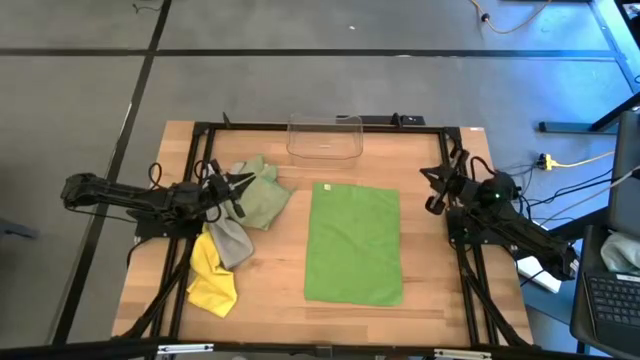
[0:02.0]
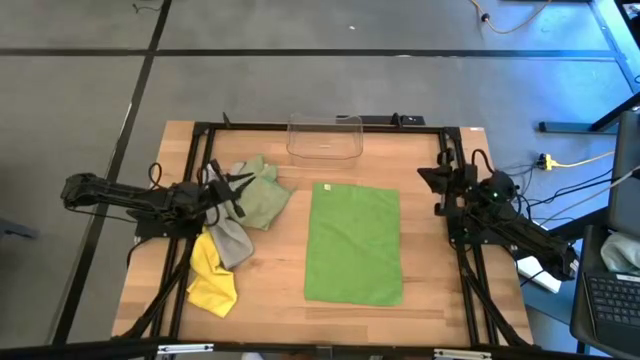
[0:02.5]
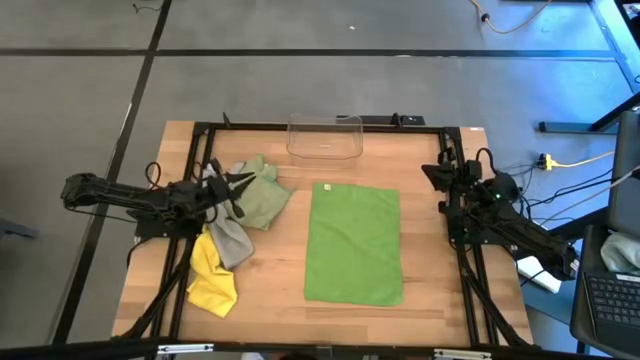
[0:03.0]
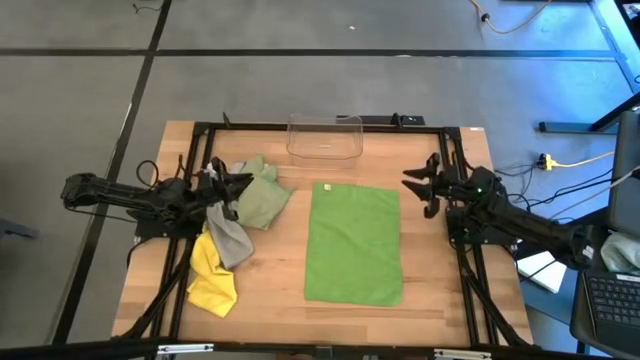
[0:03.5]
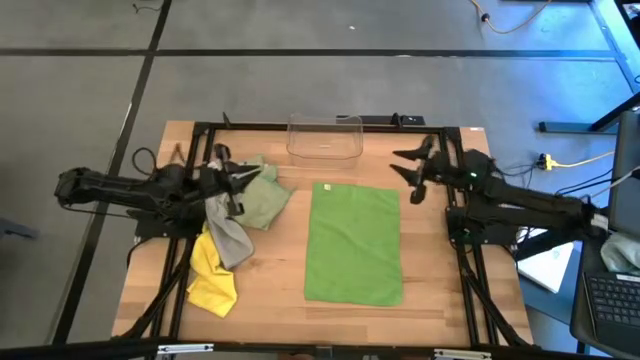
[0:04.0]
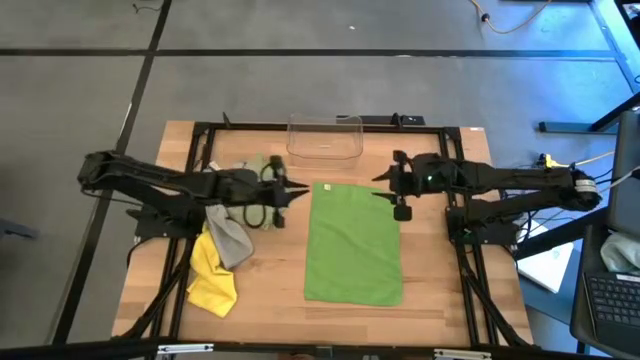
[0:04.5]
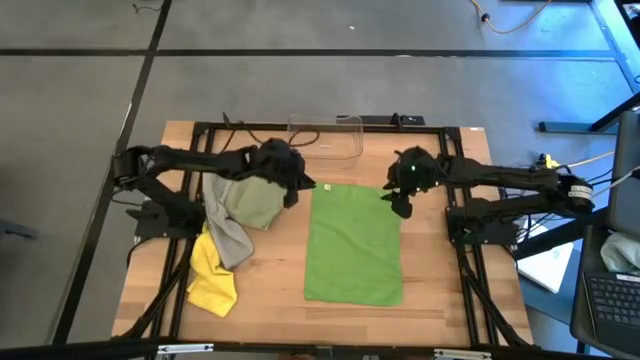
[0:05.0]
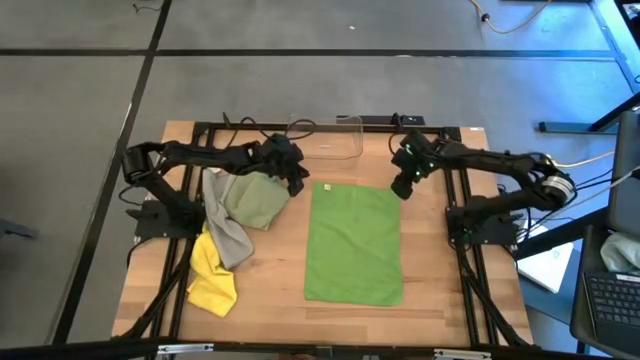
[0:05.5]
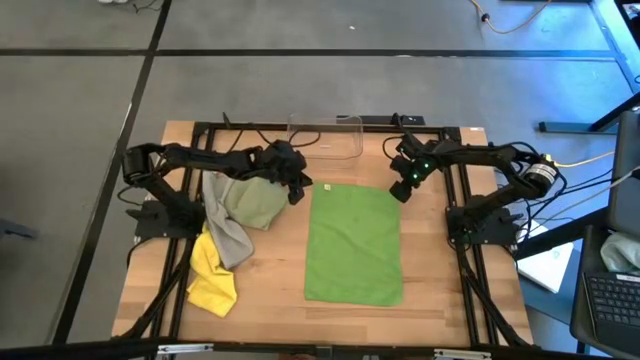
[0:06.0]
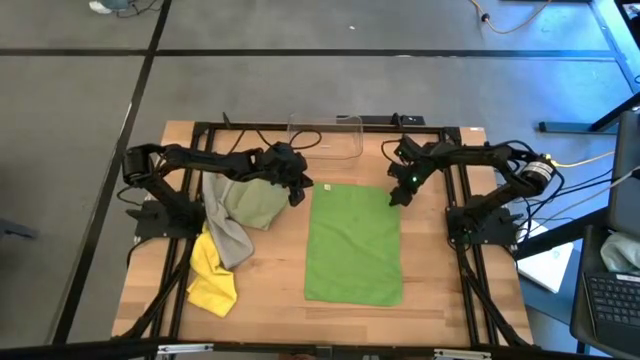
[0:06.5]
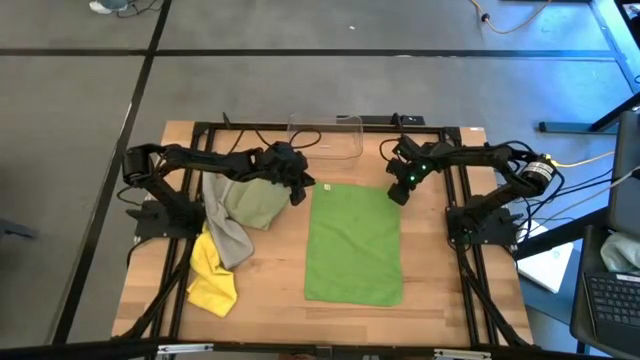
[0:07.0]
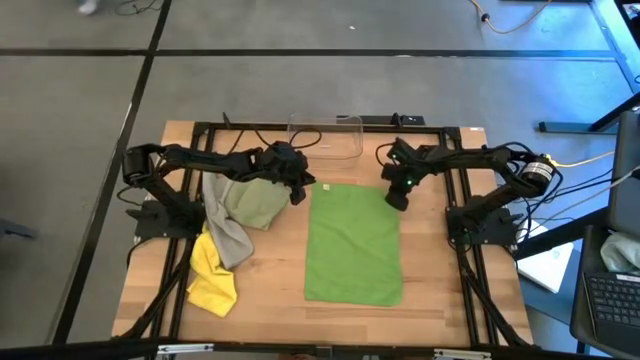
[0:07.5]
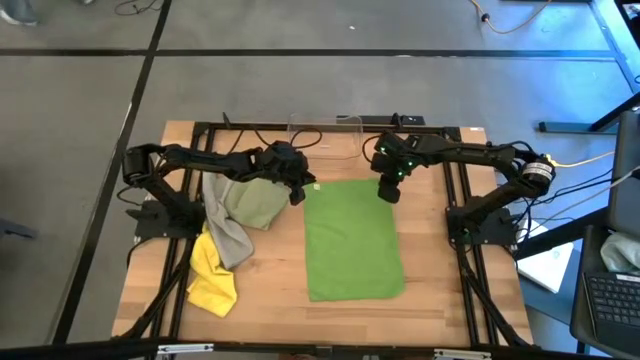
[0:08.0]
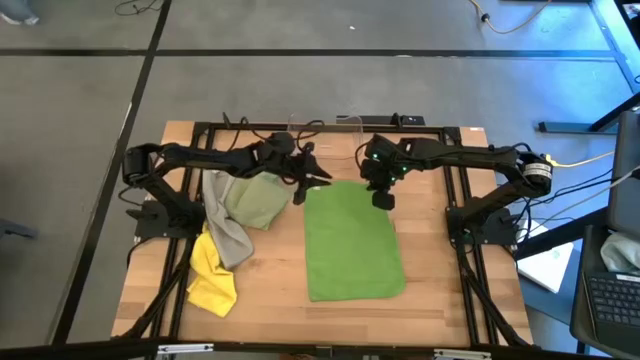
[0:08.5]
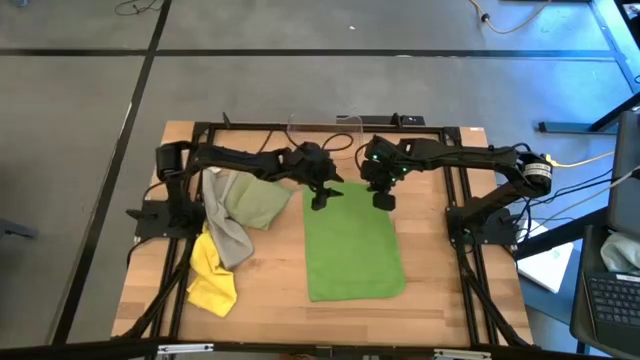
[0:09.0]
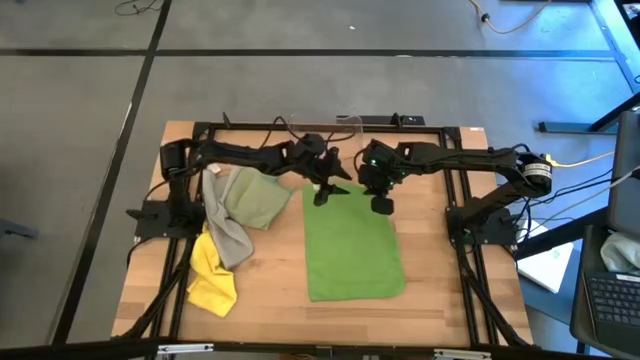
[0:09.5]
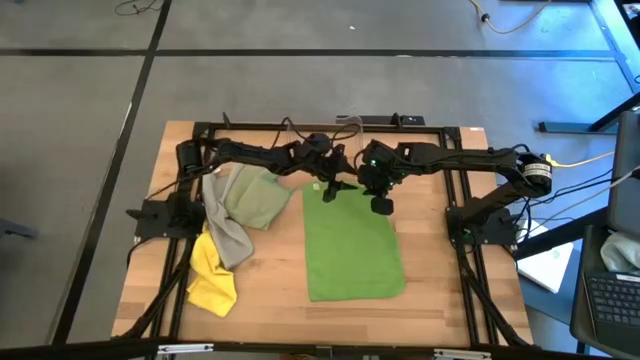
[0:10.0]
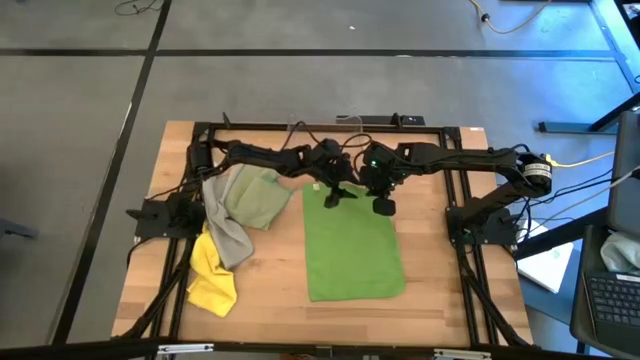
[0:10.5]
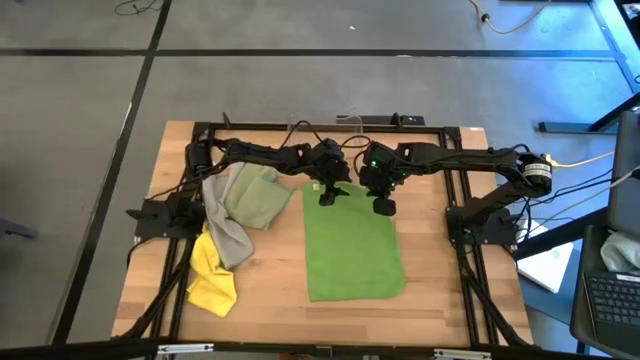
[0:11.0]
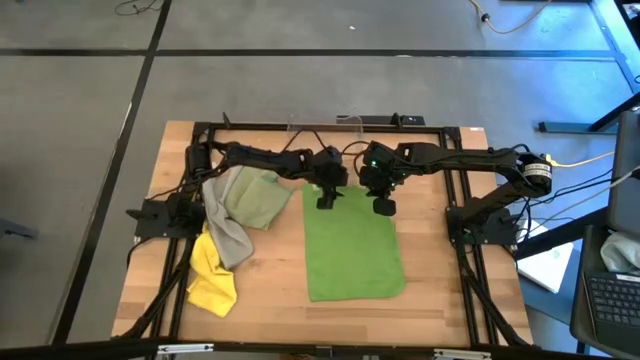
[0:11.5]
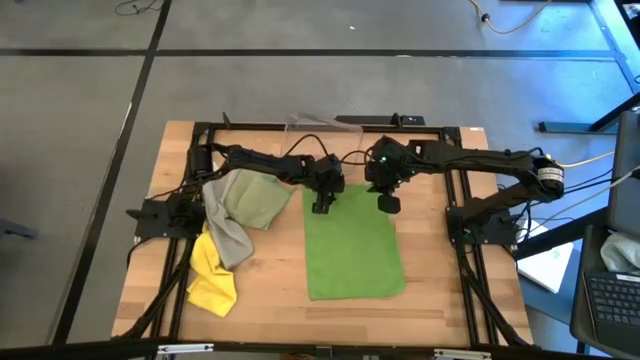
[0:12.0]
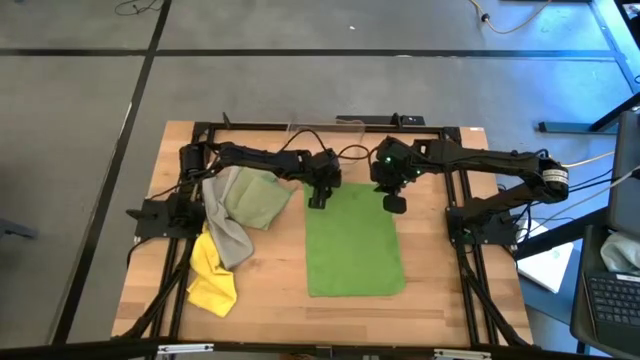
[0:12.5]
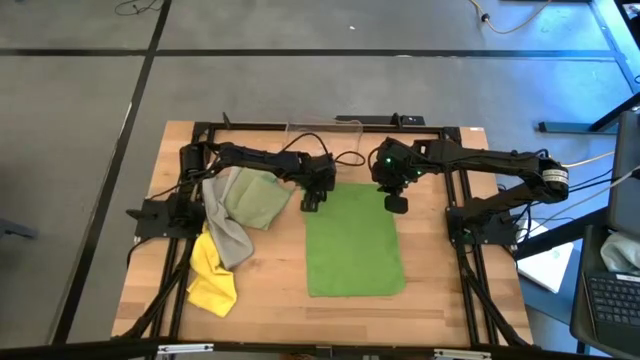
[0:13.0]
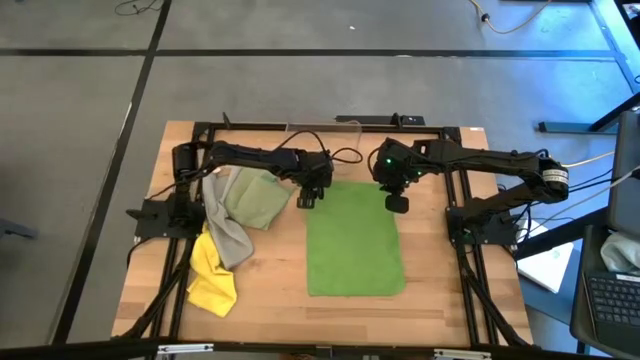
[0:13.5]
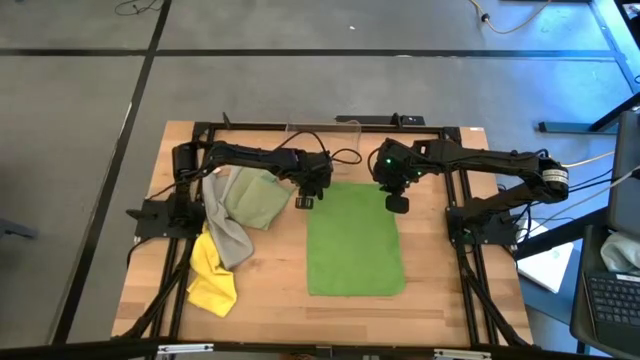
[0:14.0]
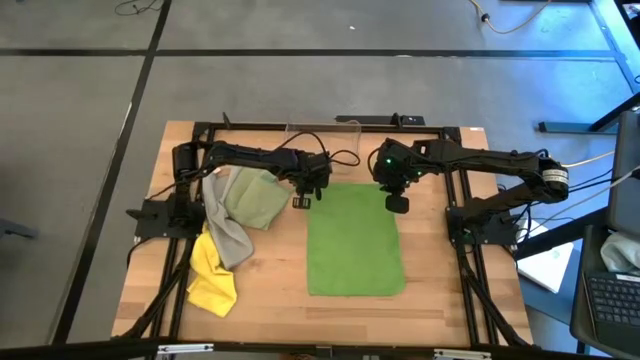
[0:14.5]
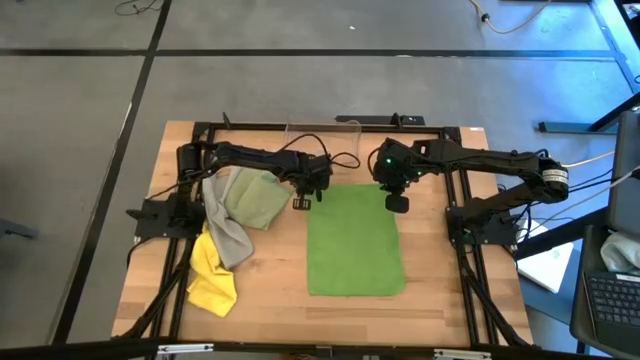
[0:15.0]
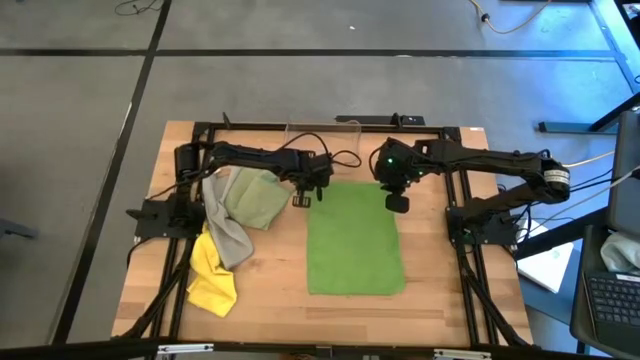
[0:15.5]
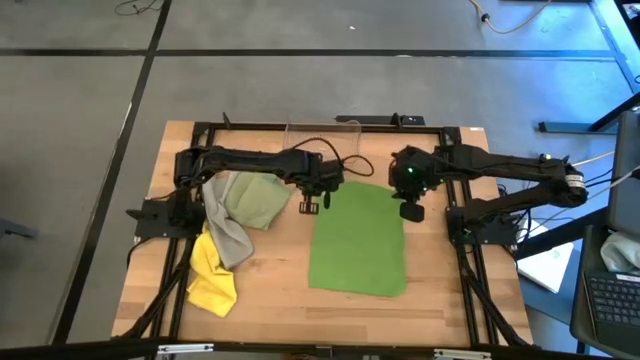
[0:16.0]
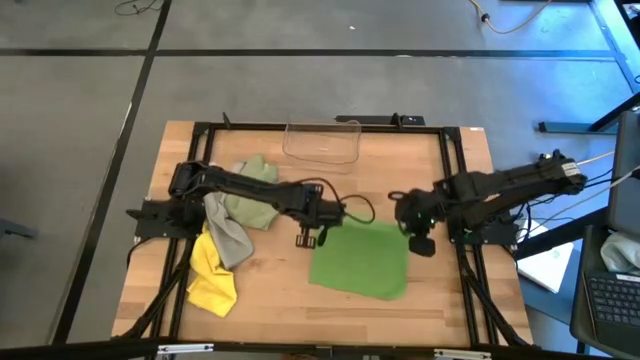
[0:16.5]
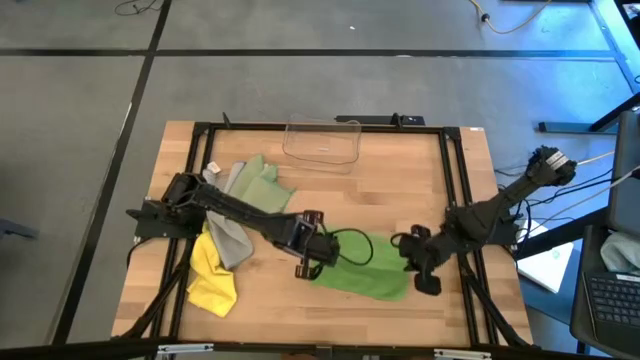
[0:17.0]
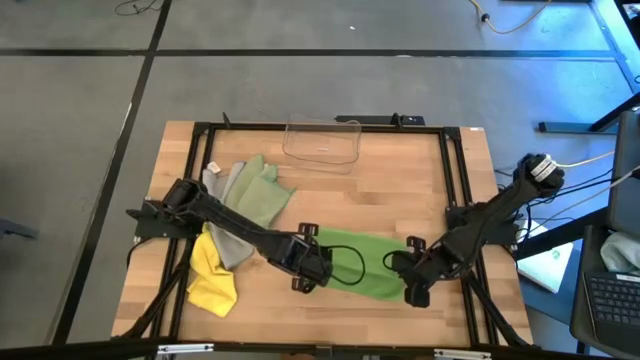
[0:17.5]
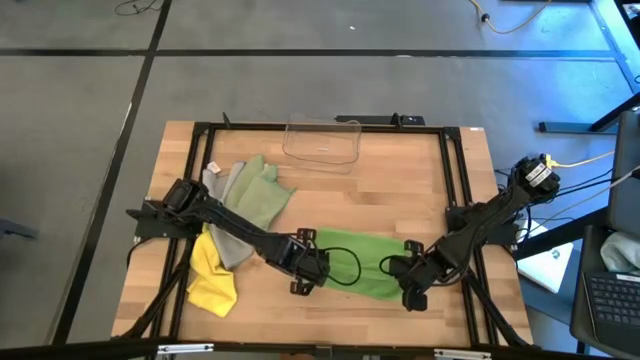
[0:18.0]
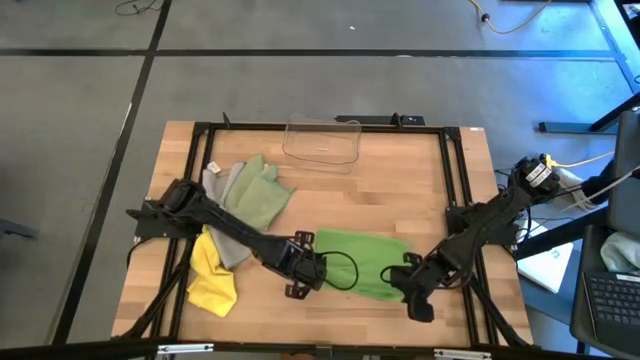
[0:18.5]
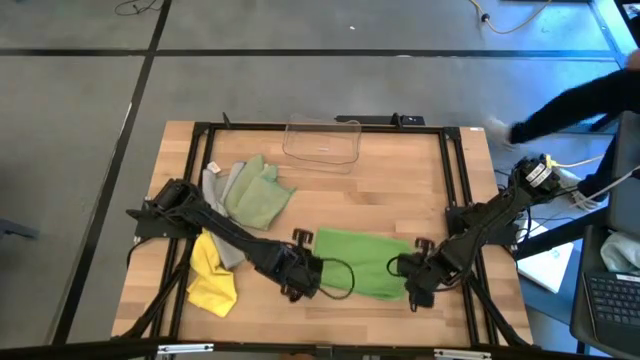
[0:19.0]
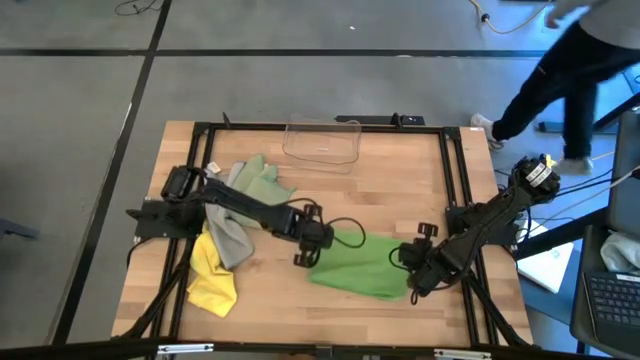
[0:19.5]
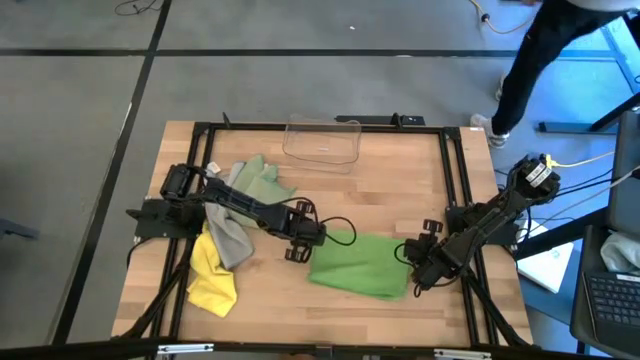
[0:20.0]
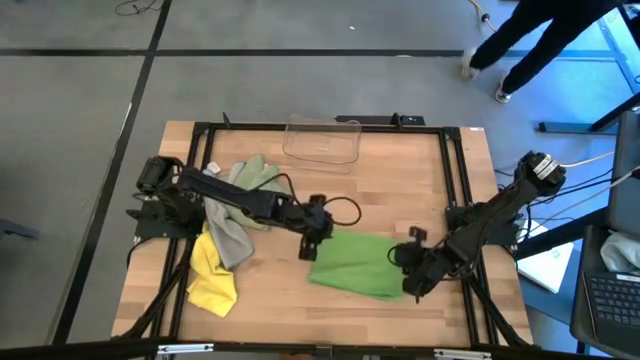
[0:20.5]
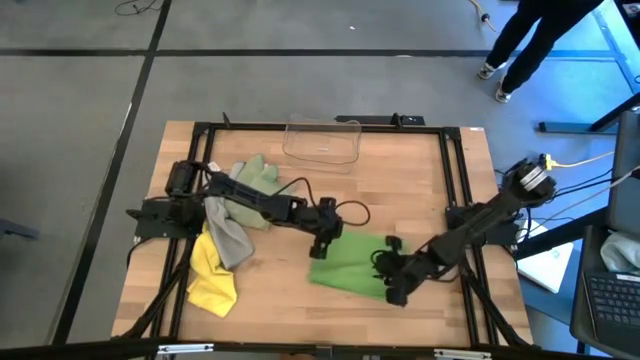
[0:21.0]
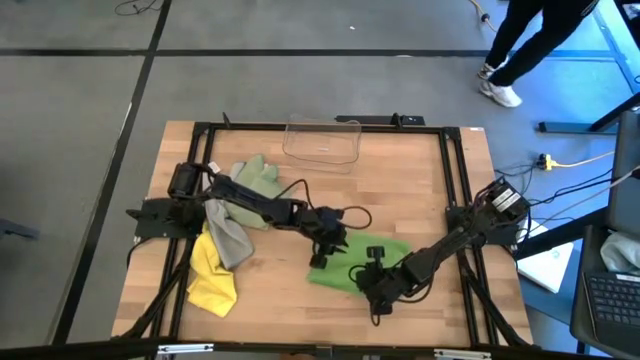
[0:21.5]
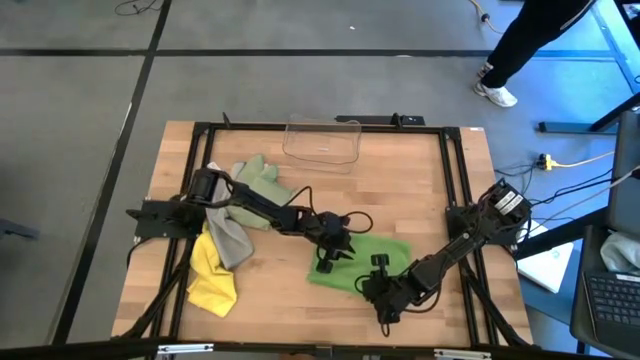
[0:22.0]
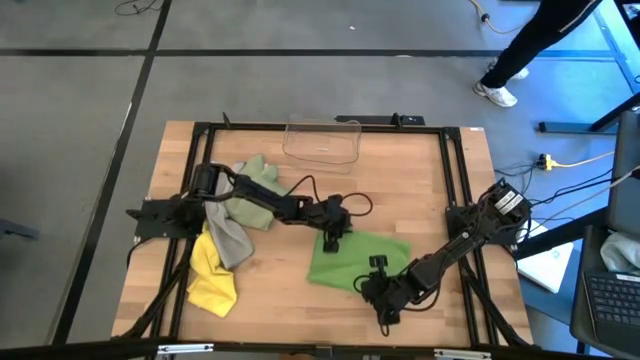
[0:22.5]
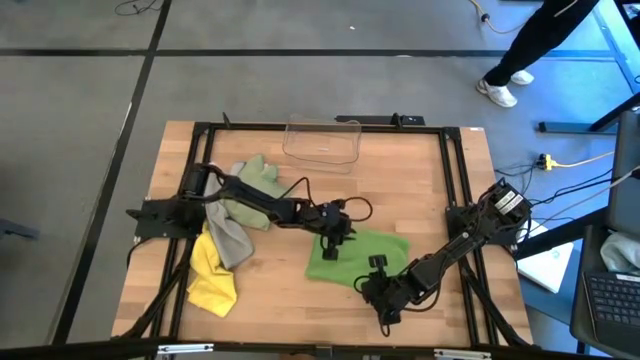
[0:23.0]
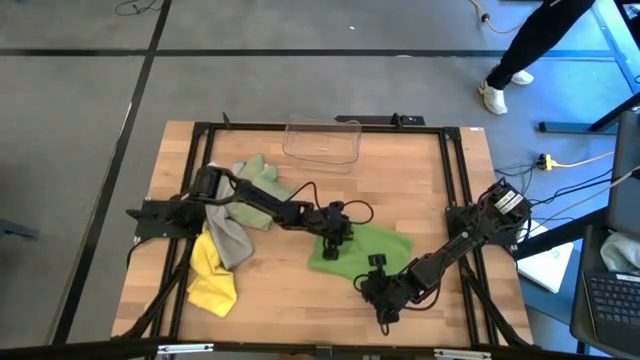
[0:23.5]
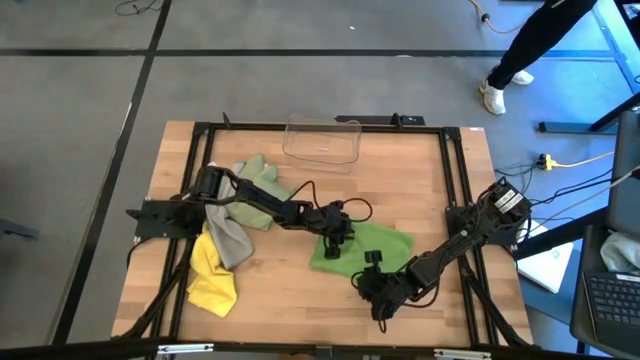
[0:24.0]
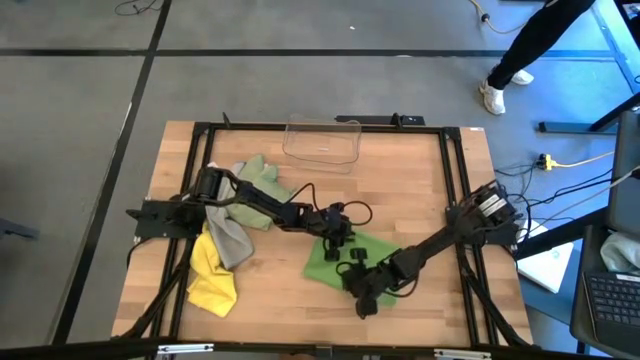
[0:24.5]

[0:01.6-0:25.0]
Task: Fold microfiber towels
Fold the green microfiber cloth
